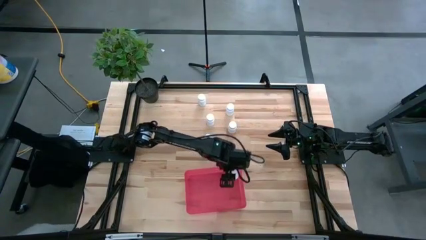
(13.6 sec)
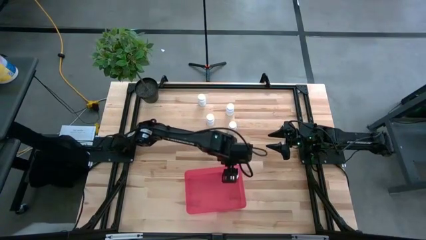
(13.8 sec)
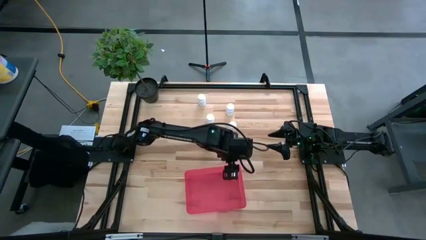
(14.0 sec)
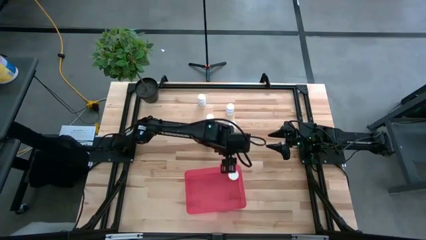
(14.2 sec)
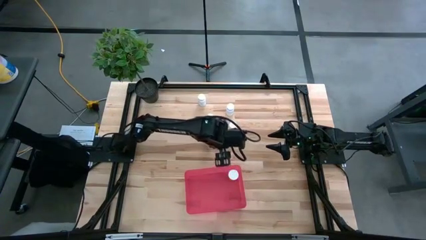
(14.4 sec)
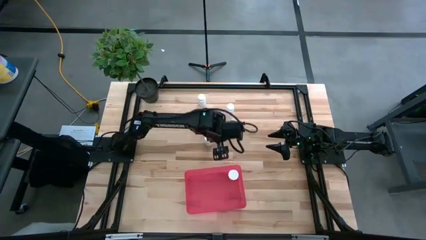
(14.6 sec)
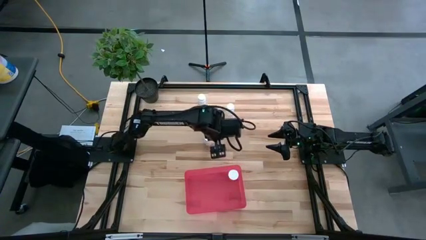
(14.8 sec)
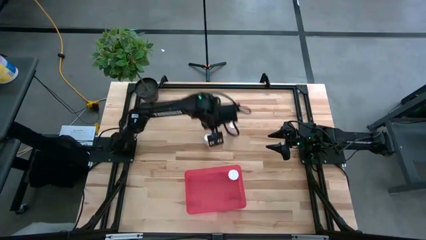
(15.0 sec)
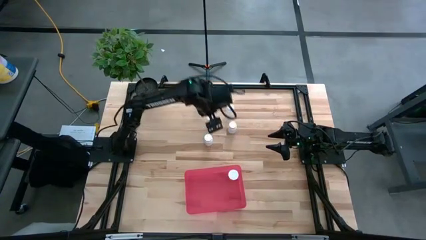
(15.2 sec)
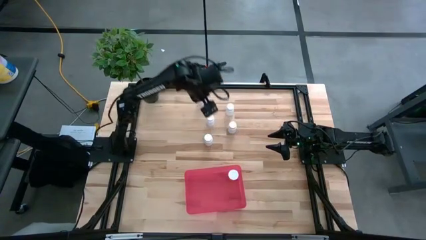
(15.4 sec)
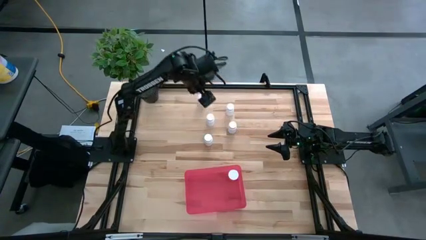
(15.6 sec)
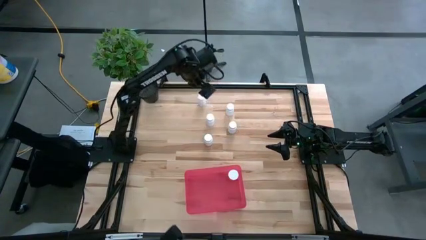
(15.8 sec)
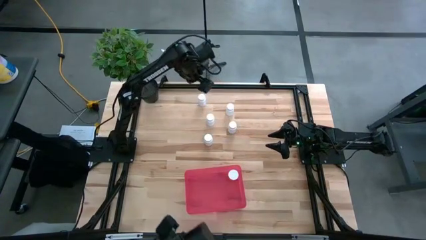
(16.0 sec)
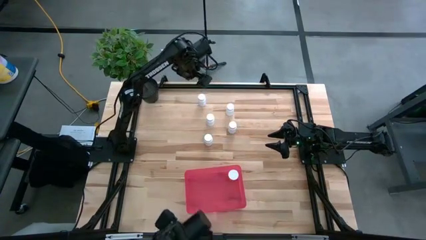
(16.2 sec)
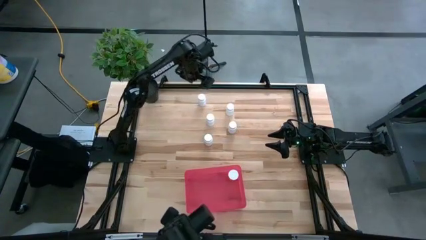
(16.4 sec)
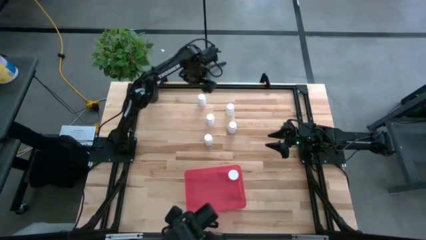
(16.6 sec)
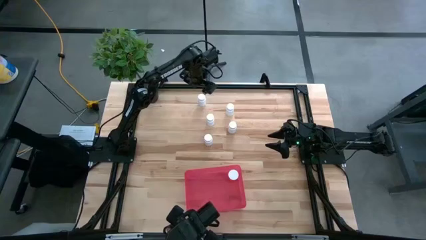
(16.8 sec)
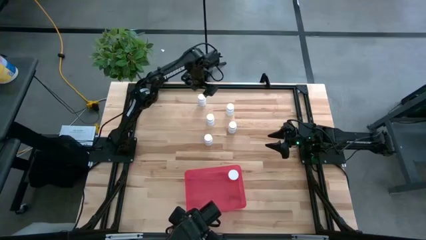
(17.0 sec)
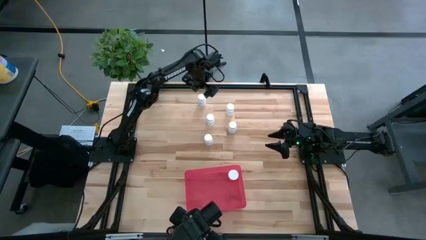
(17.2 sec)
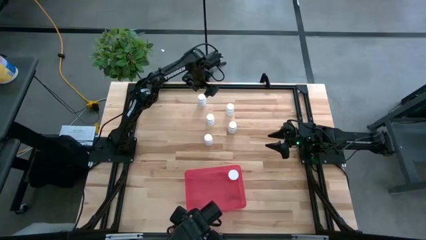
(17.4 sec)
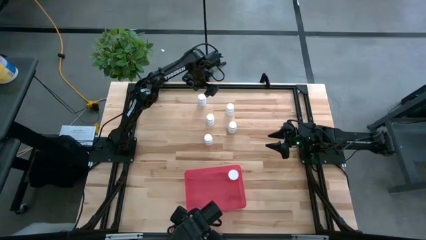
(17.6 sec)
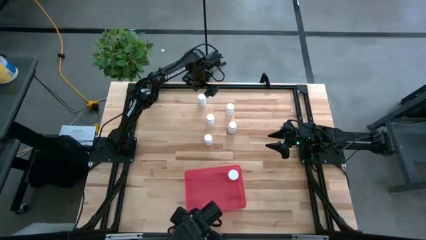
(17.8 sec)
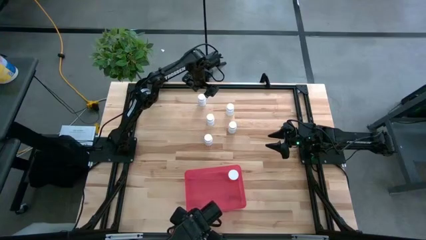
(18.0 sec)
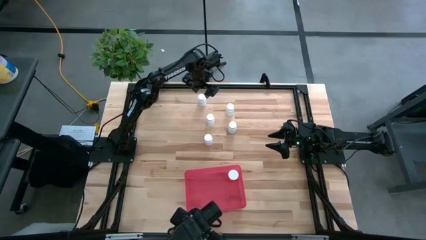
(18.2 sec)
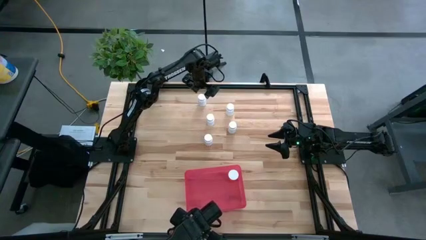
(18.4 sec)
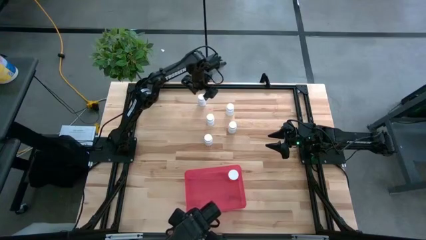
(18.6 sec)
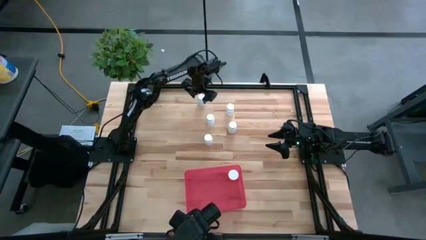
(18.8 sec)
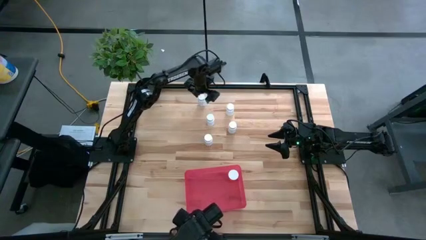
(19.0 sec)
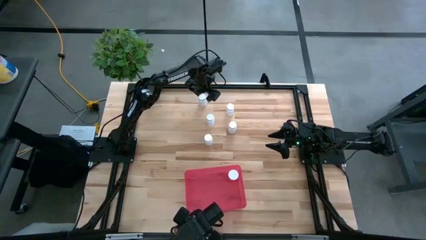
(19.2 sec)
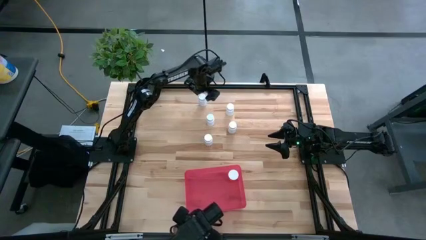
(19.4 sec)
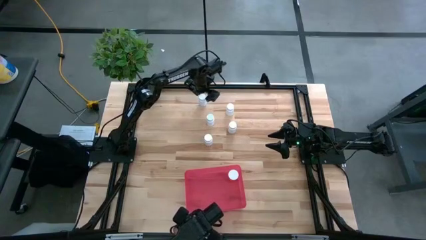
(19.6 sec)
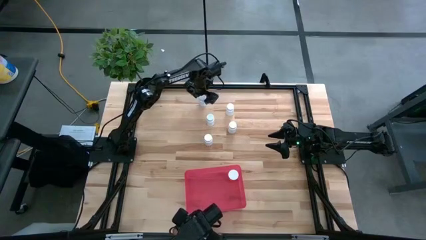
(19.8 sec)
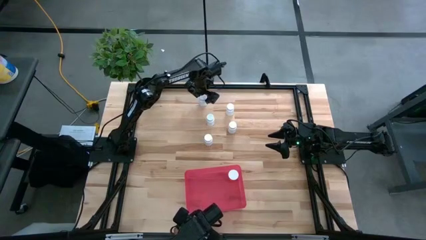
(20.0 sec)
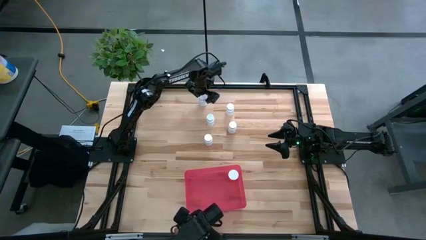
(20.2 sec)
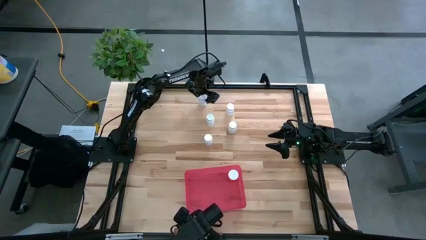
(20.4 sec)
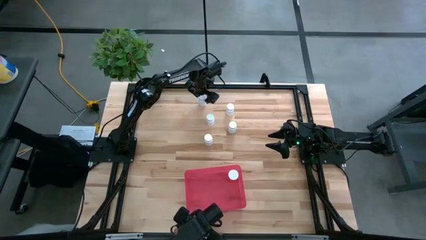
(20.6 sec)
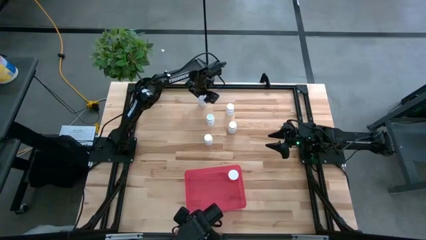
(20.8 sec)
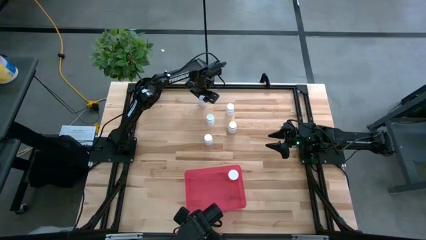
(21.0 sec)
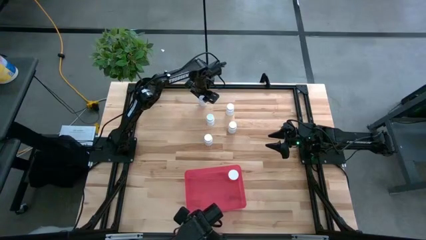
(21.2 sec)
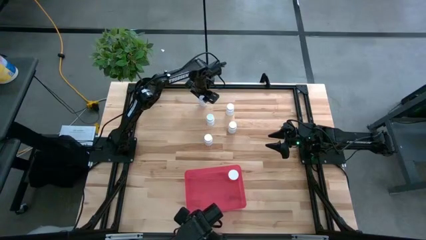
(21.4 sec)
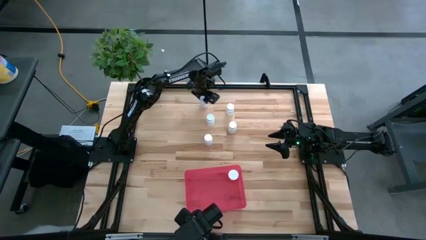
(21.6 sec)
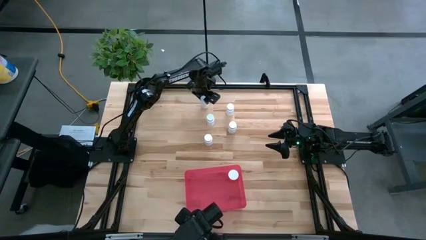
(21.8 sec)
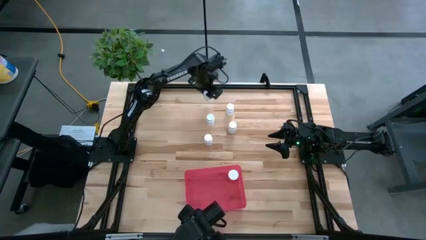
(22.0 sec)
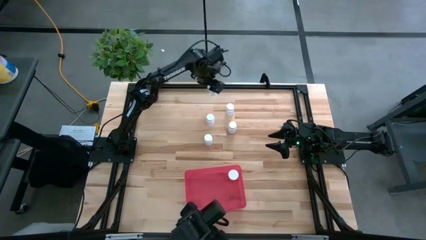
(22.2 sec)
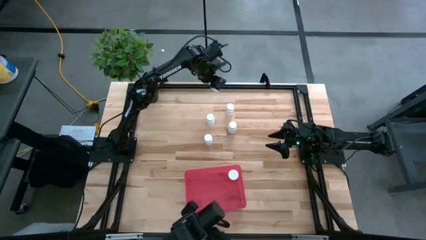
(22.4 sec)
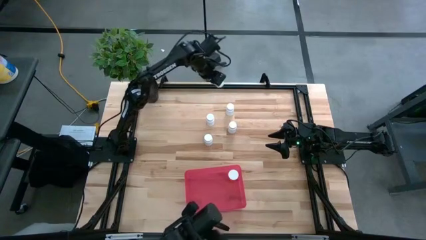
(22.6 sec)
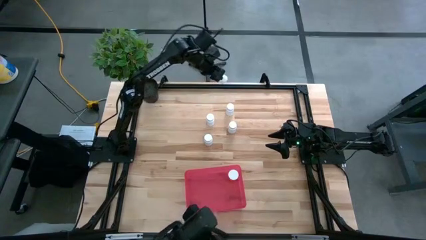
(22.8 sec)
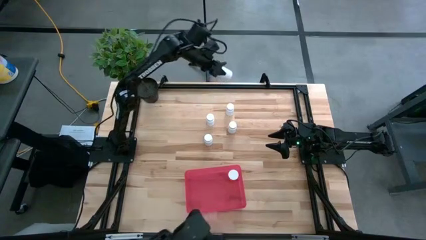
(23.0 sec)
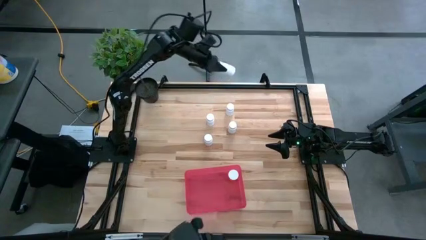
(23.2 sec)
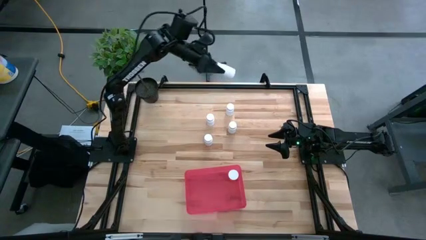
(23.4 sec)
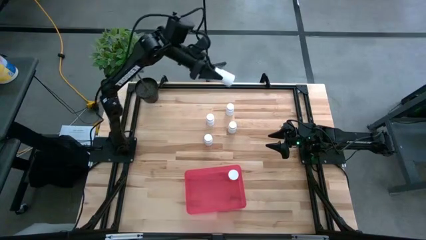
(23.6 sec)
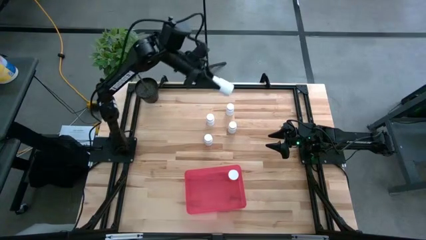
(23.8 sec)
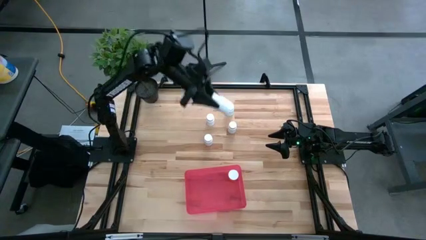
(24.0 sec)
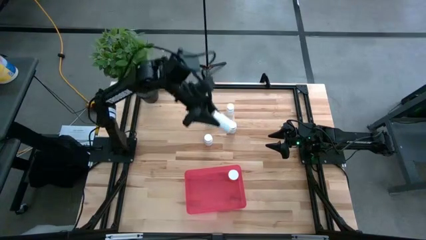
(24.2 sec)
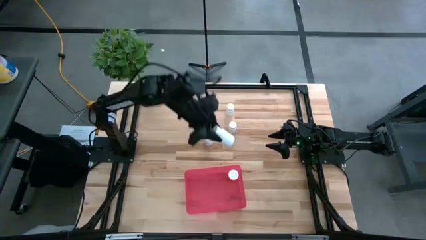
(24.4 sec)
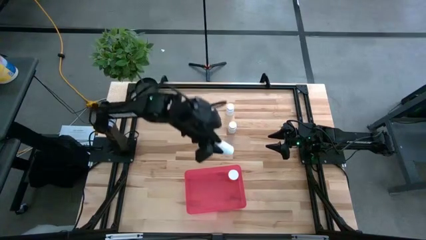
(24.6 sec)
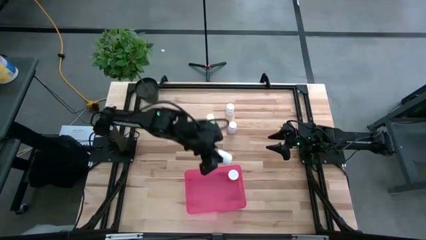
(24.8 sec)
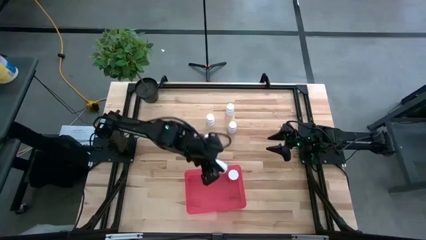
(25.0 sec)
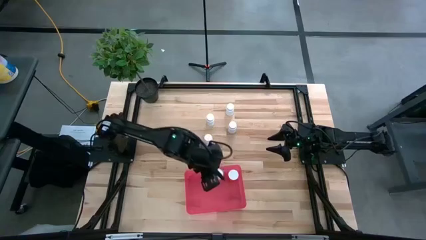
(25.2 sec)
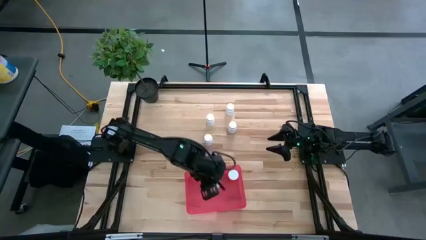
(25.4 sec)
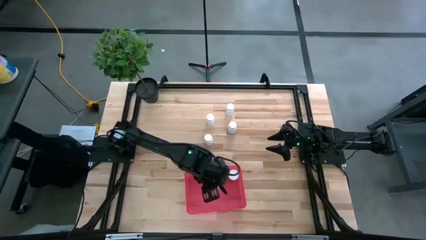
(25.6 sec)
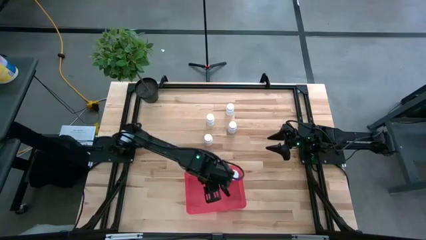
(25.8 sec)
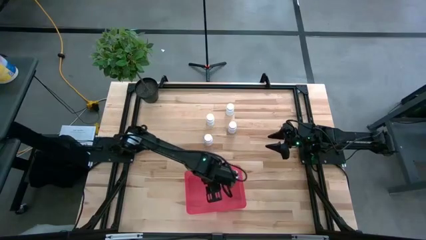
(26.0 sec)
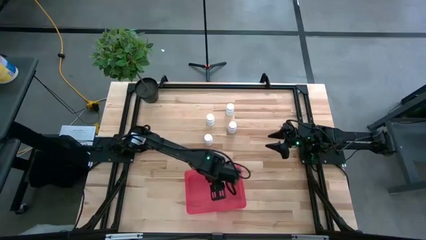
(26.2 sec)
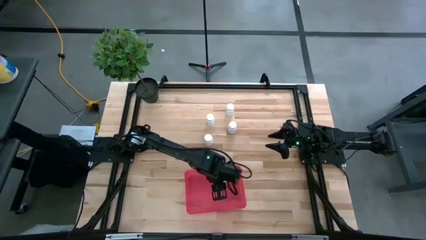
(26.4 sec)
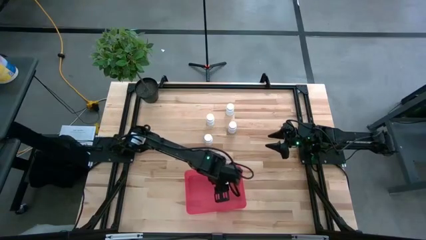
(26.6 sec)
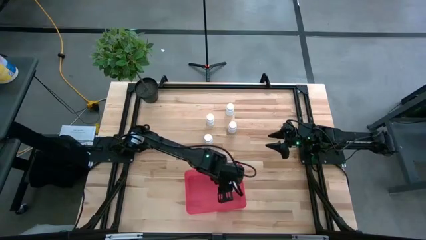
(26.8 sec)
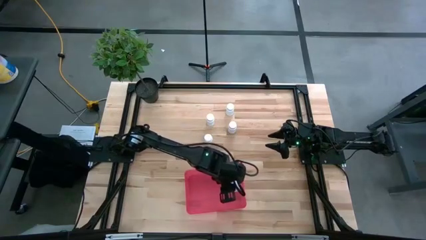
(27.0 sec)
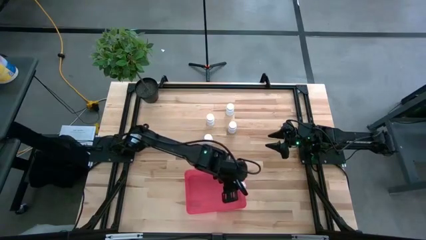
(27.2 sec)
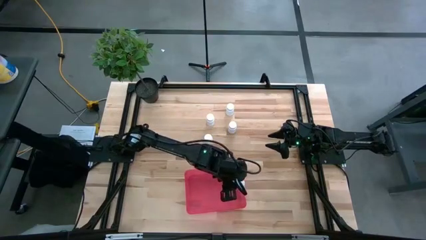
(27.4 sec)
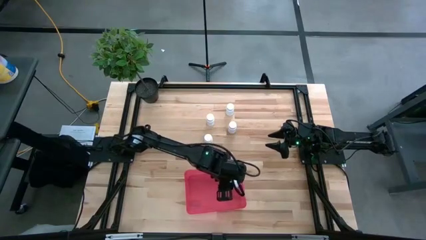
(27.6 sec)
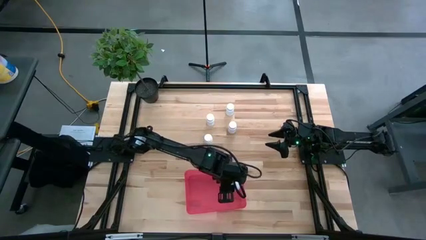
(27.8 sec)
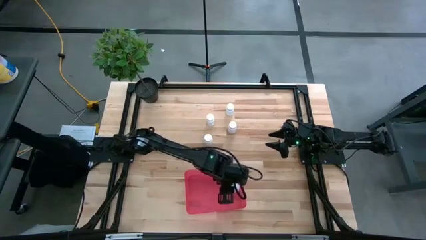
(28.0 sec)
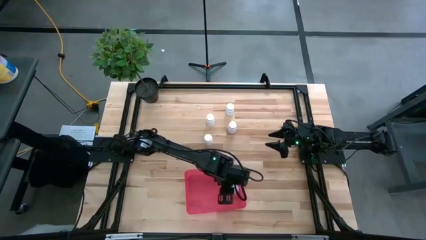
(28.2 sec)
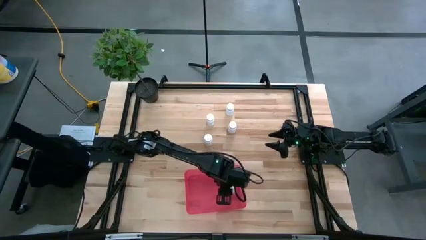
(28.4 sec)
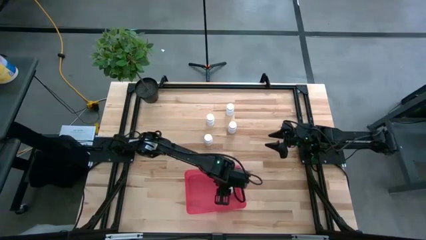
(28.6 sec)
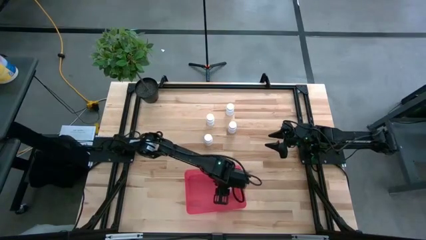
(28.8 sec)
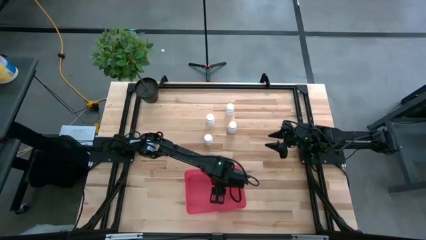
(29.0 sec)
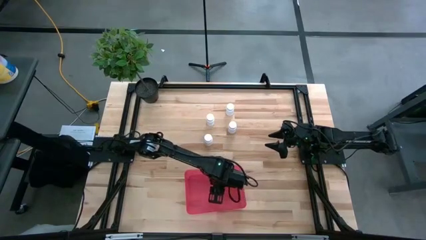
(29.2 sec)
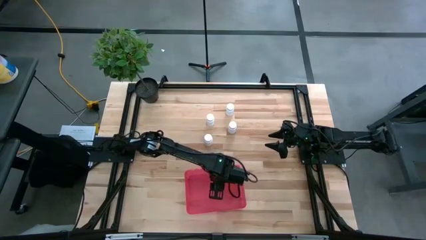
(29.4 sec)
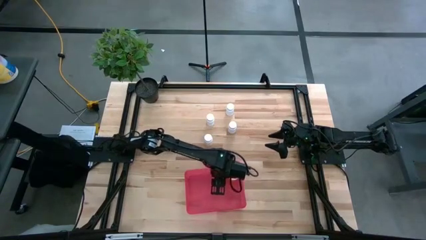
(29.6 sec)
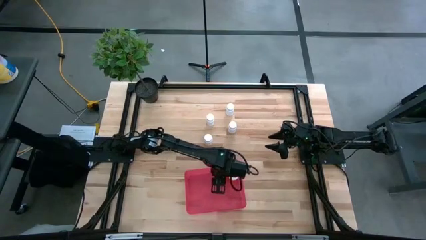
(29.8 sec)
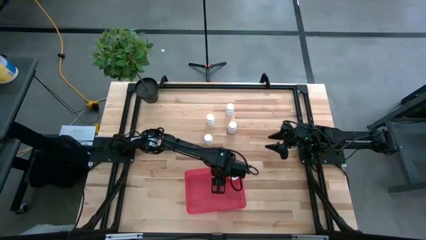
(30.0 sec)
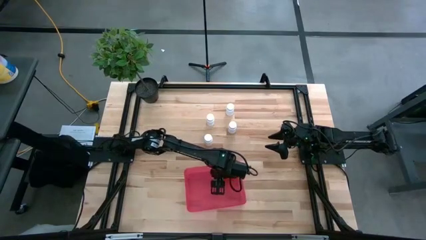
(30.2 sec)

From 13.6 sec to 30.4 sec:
Task: Pick and place pill bottles into a basket
Put the white pill bottle into the red bin
